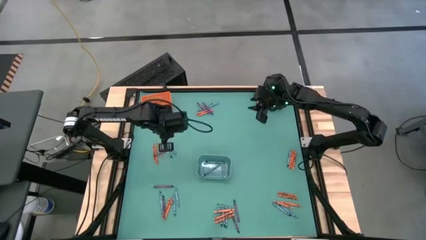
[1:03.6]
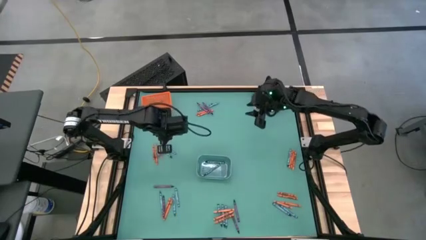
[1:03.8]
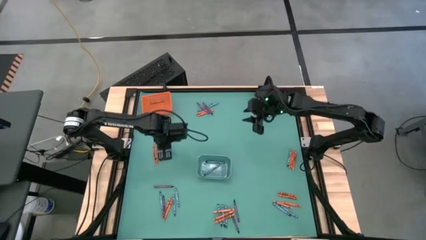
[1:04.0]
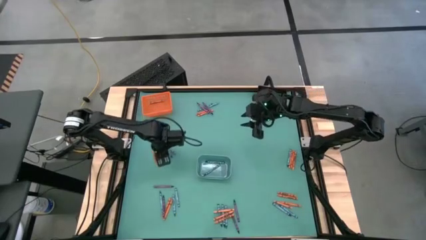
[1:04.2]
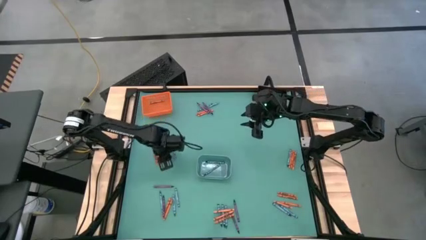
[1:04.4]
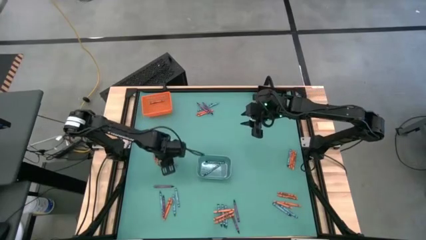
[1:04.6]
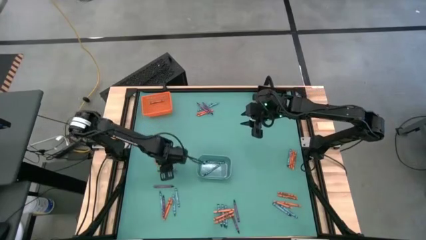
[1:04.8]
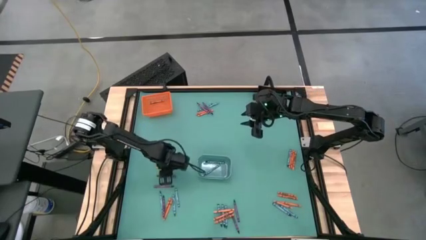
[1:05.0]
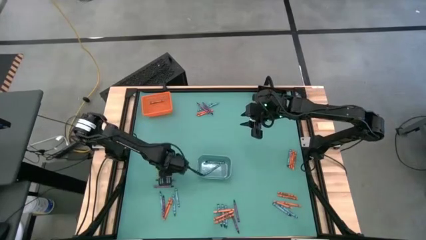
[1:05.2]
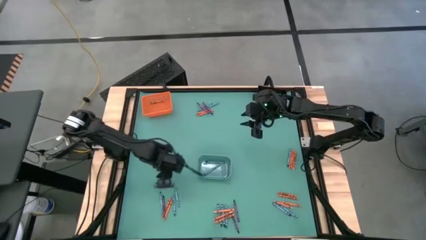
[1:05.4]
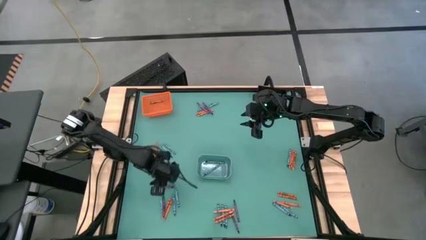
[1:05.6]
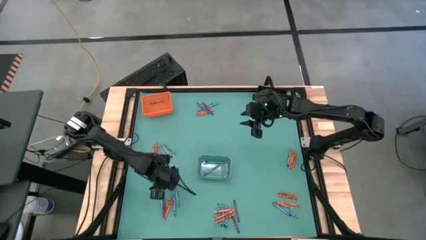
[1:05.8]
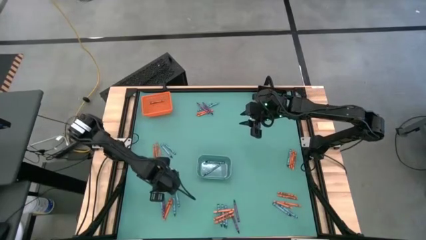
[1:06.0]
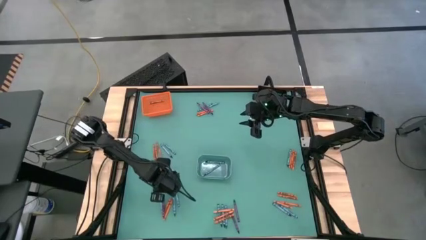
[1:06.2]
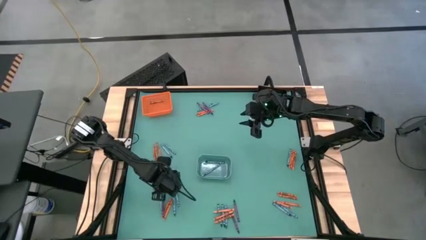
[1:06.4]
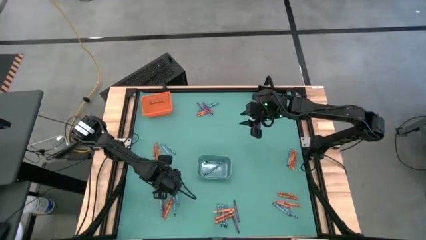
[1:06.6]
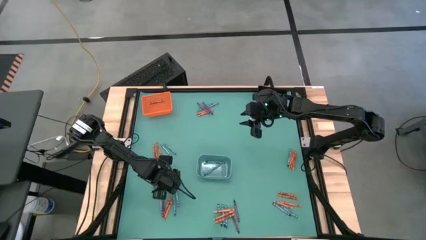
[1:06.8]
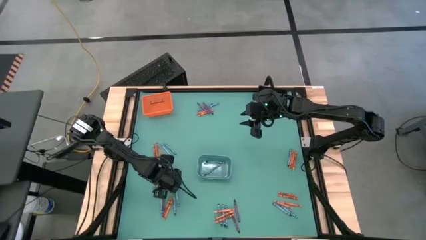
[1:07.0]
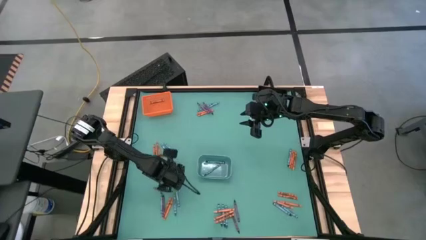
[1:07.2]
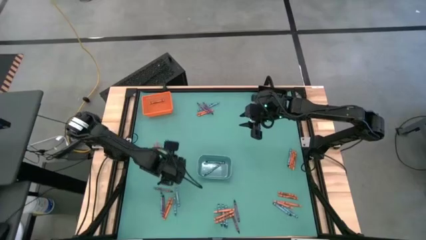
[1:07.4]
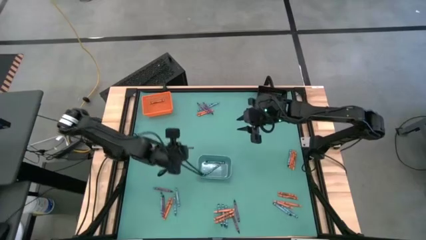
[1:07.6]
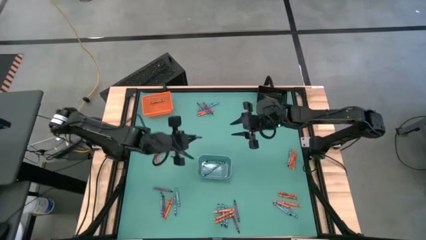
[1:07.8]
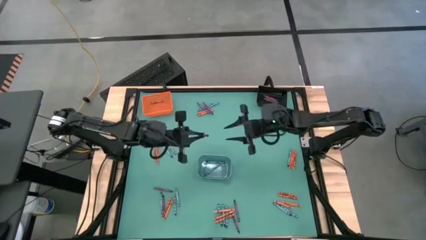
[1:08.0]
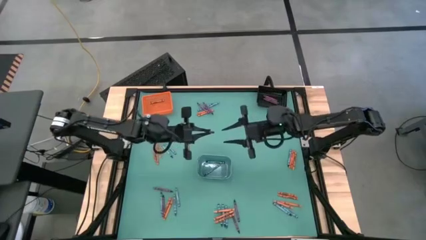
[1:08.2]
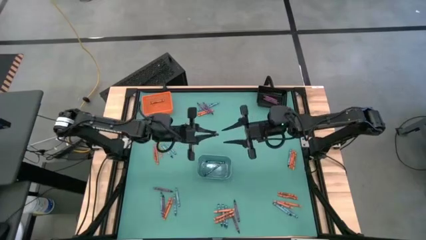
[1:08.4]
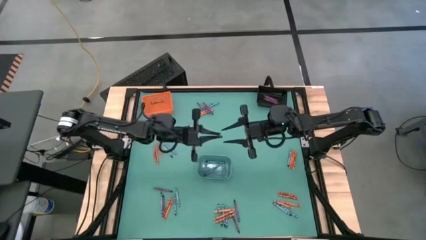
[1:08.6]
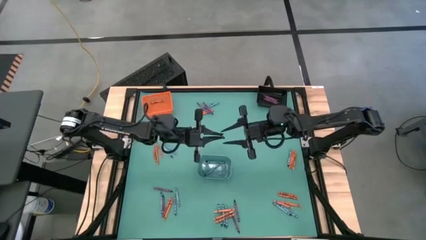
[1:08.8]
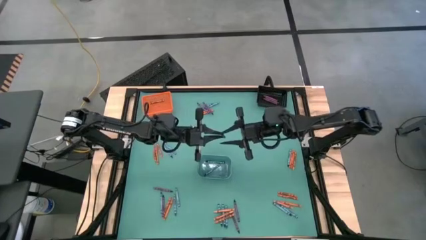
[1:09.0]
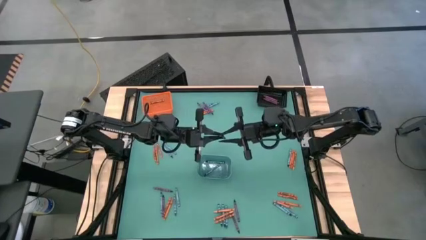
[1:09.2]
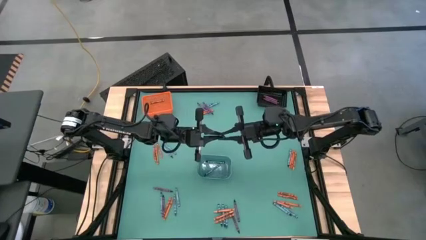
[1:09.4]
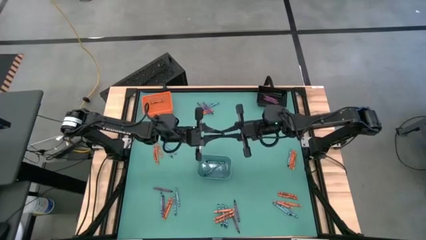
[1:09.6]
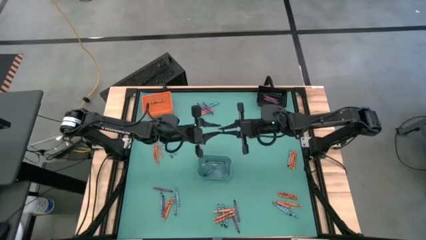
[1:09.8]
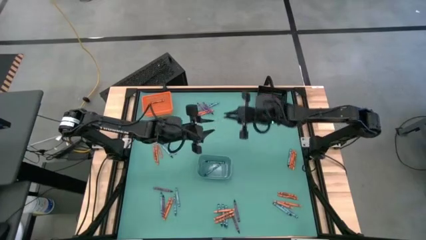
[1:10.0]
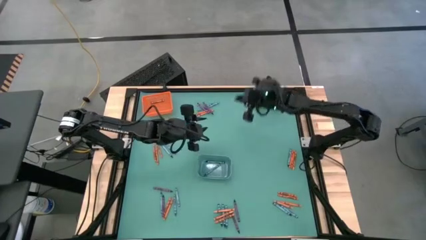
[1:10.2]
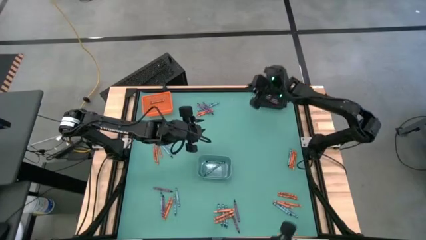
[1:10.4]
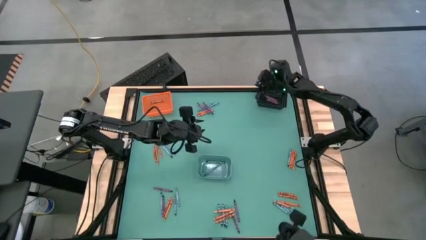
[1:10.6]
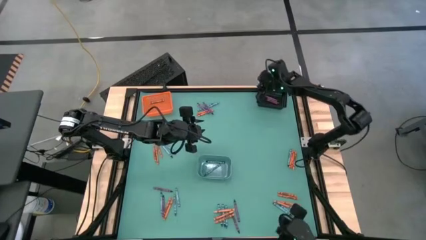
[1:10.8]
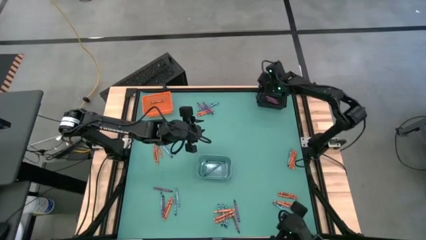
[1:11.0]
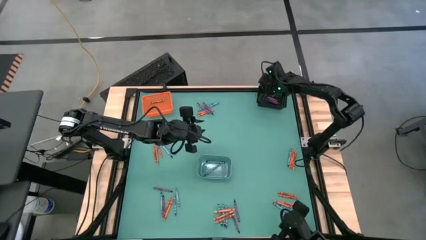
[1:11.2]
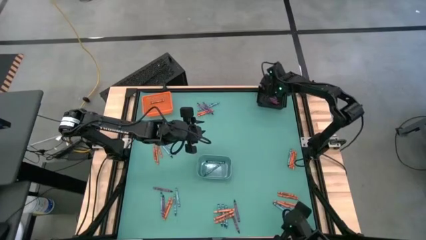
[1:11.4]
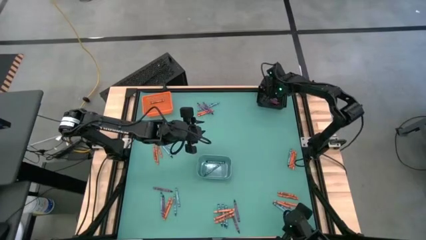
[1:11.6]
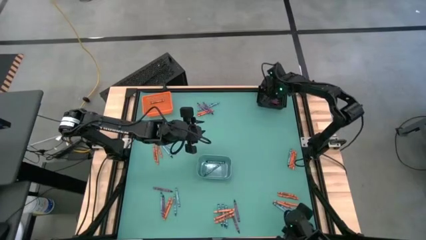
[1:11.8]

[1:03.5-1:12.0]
Task: Sort crayons
Put the violet crayon into the black bin

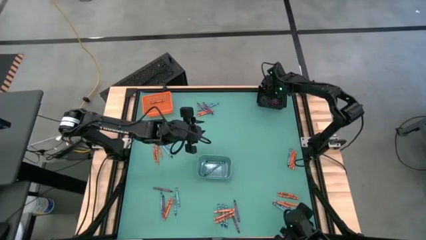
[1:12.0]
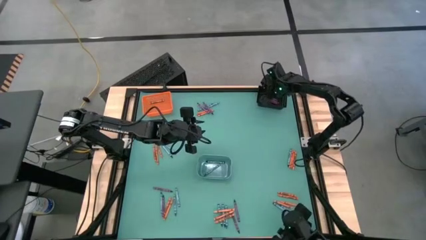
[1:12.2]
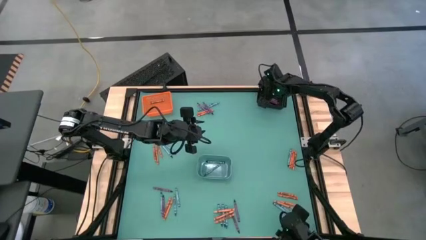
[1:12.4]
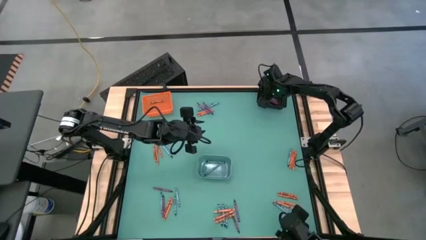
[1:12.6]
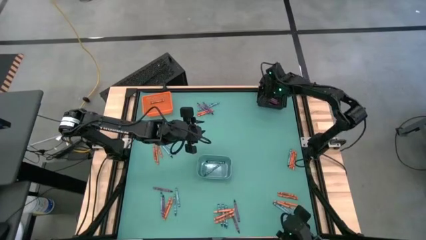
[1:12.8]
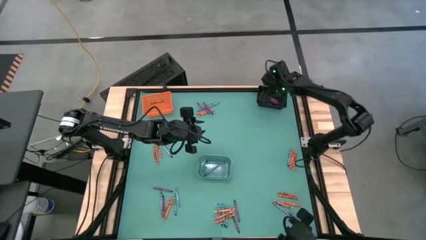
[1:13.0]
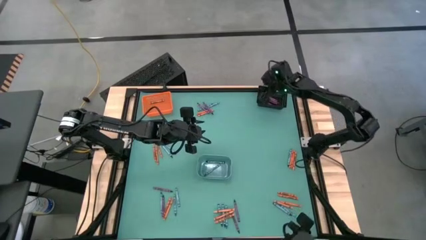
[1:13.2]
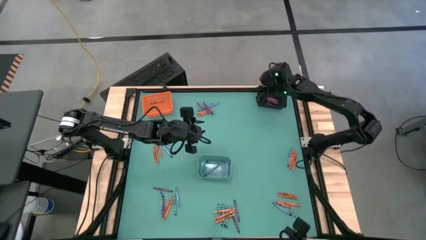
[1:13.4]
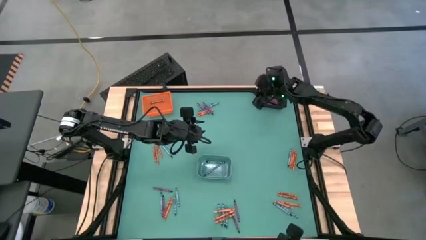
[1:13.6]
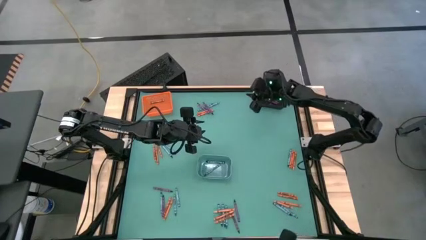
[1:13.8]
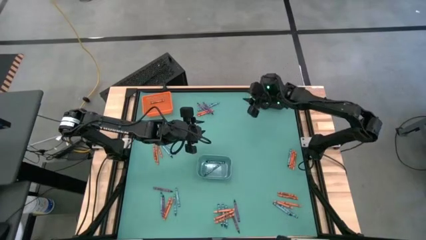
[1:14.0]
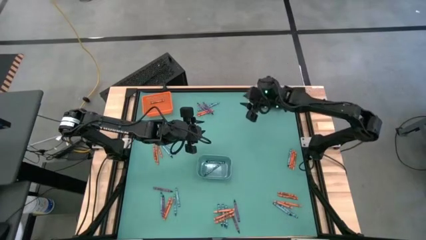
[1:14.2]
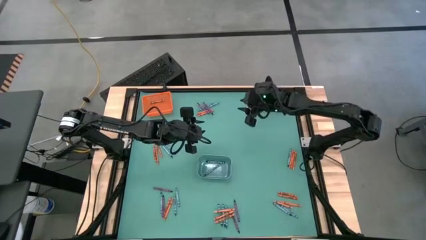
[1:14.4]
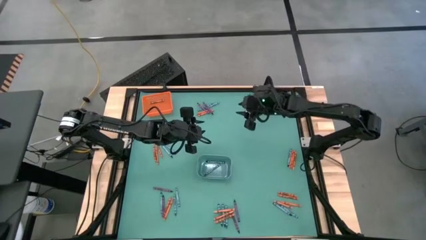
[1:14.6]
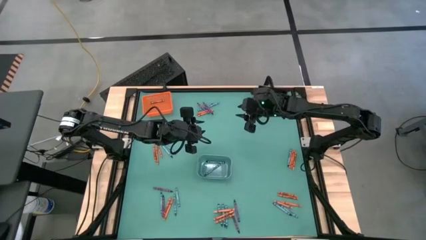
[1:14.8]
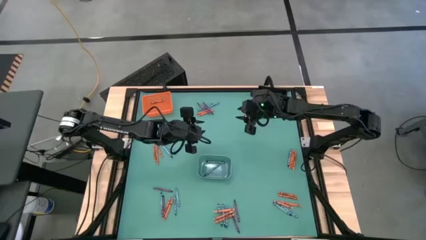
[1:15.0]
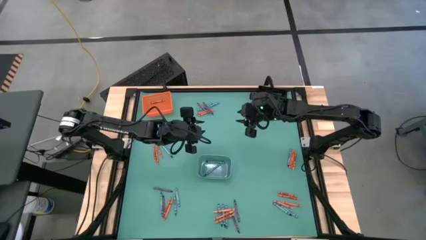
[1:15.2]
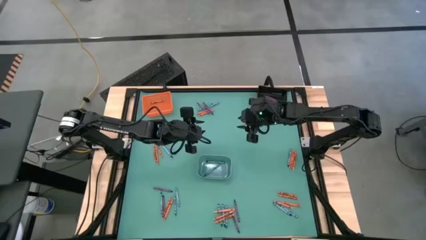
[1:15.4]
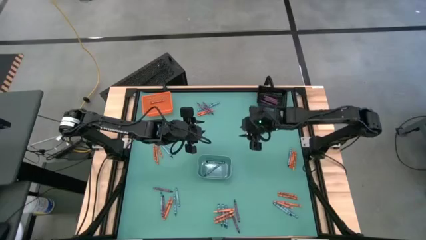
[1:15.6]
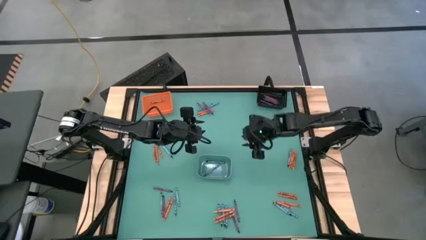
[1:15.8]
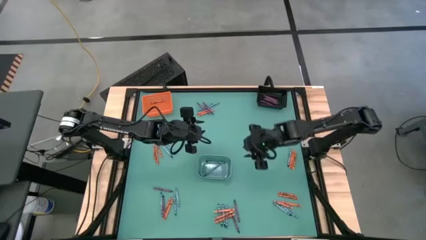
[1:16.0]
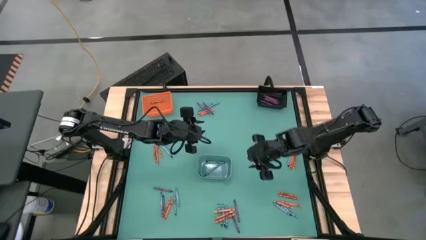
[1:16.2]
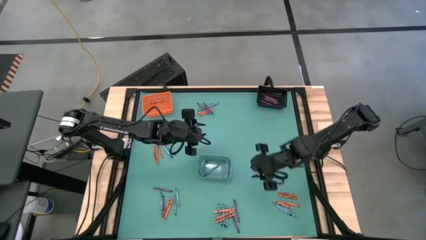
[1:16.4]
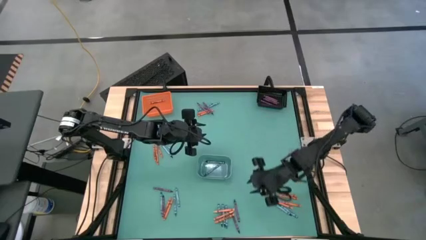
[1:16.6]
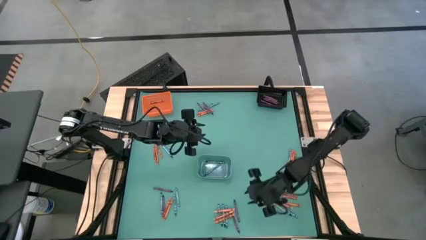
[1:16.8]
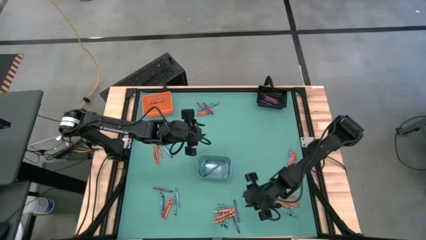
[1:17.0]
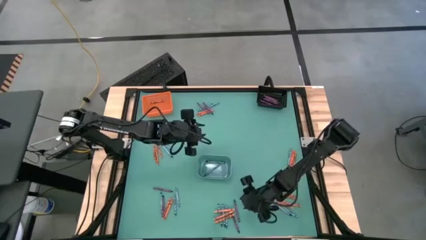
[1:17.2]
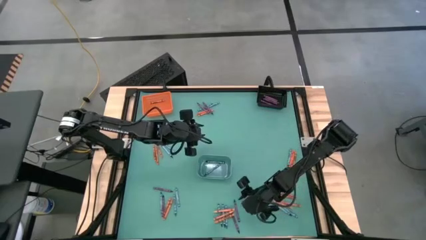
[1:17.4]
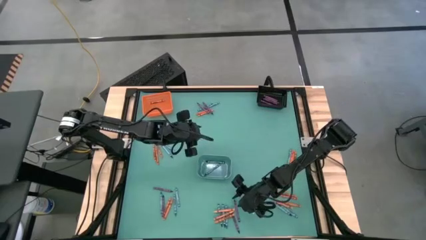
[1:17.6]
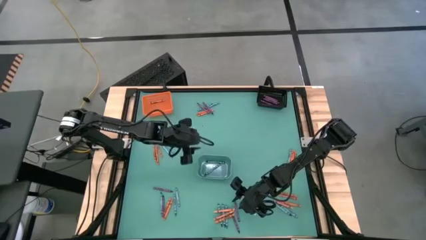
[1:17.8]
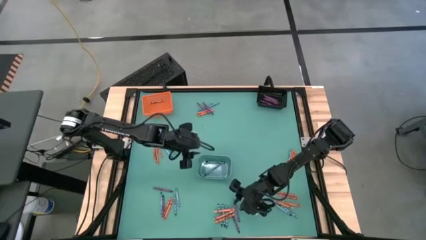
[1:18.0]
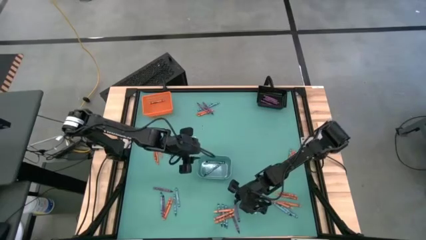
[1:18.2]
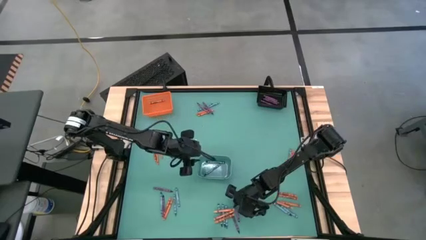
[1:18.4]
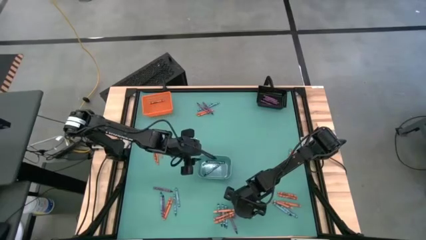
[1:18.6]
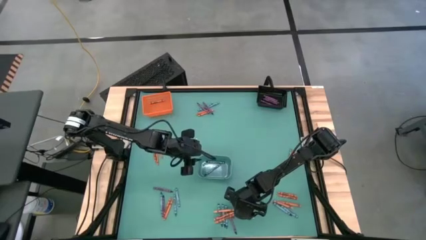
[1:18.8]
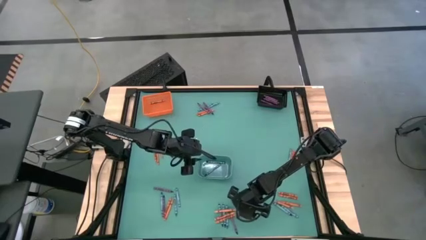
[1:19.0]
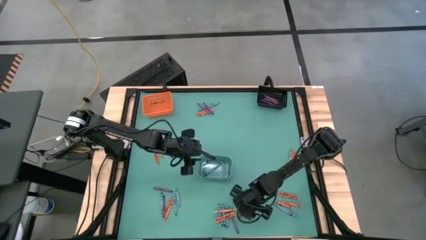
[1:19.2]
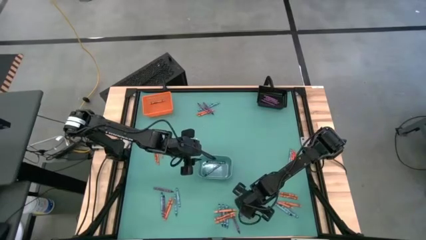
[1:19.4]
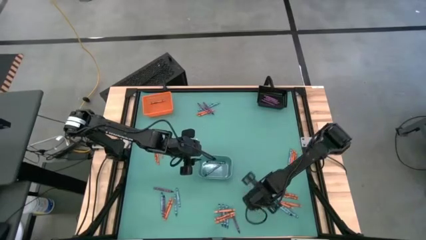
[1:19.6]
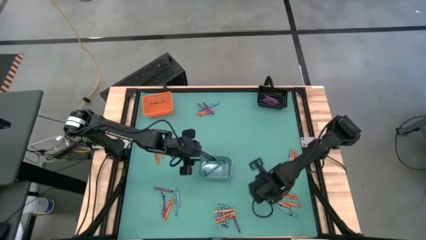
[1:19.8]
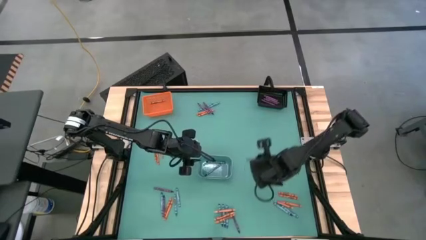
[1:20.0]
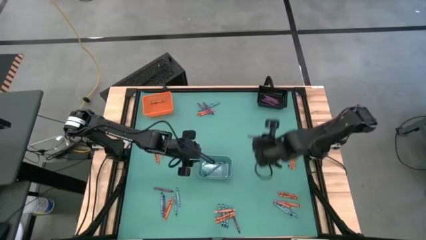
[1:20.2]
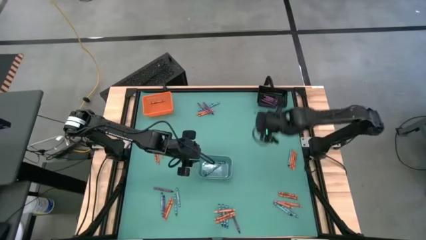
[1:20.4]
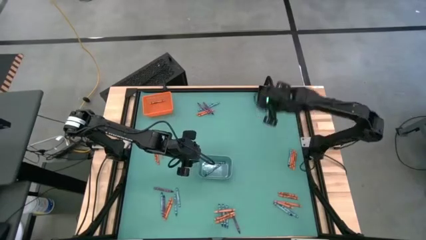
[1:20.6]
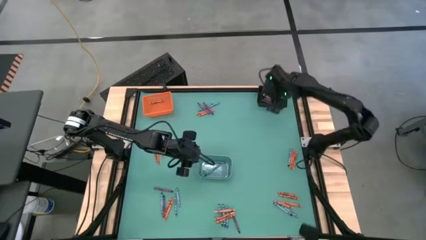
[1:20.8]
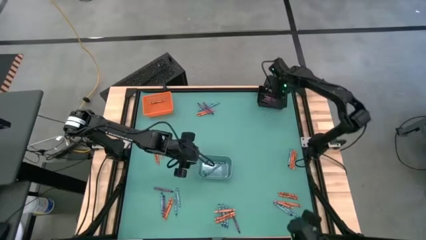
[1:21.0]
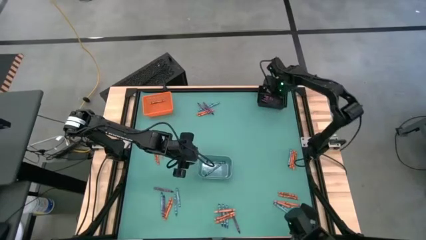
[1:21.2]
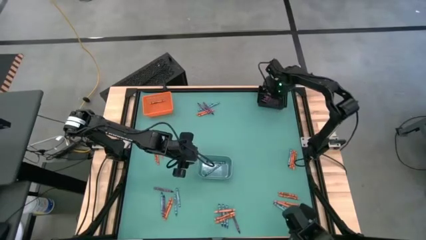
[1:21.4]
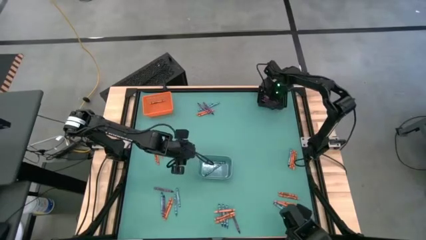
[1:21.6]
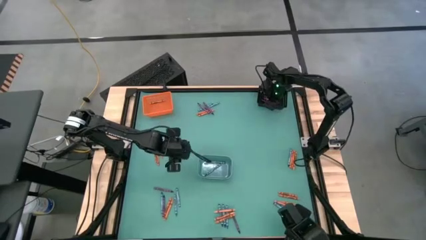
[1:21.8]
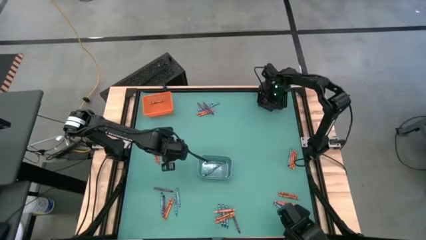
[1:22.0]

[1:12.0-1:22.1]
Put the violet crayon into the black bin
